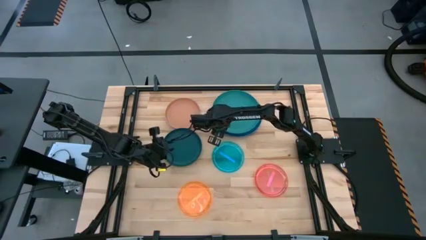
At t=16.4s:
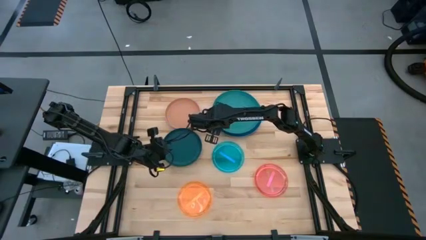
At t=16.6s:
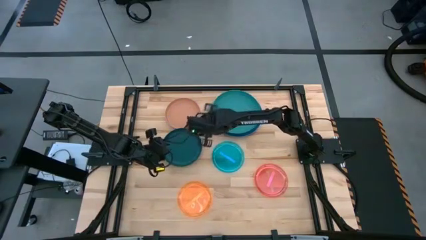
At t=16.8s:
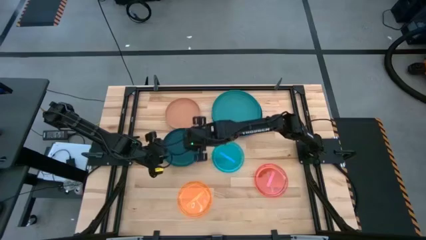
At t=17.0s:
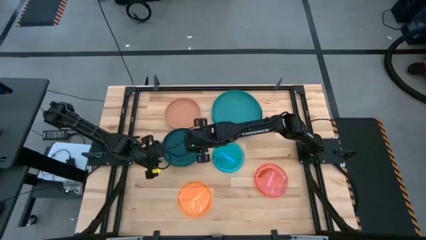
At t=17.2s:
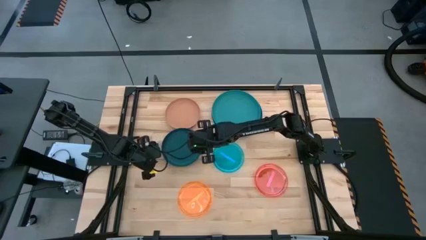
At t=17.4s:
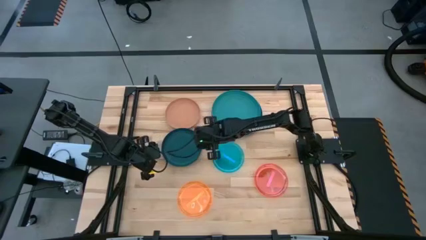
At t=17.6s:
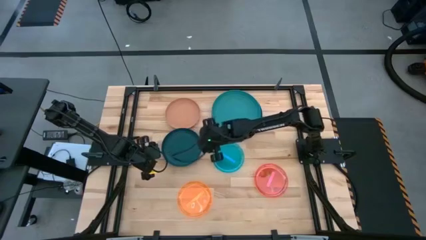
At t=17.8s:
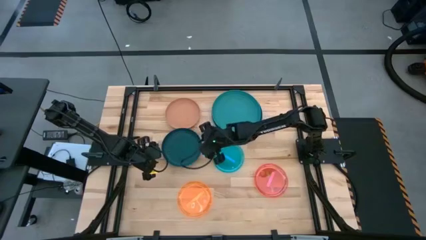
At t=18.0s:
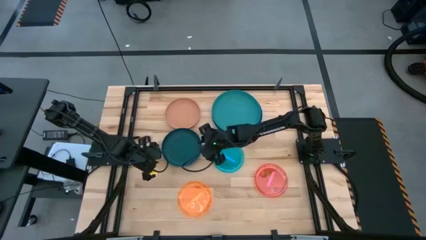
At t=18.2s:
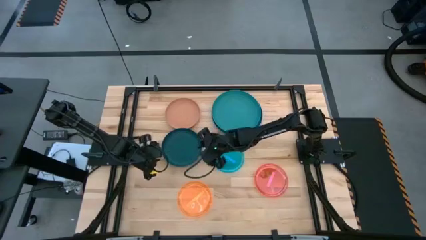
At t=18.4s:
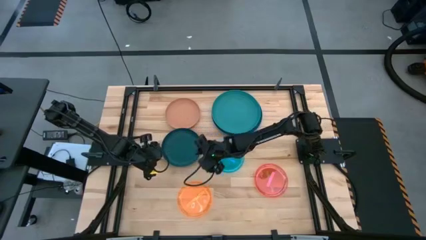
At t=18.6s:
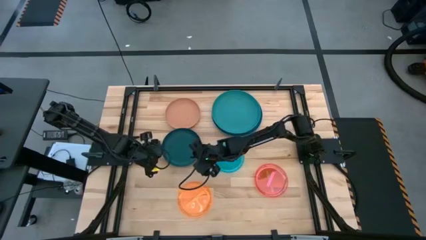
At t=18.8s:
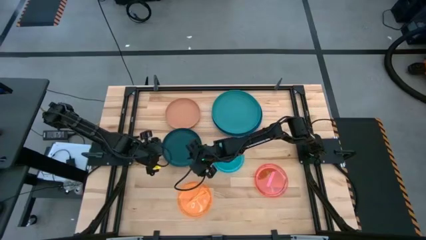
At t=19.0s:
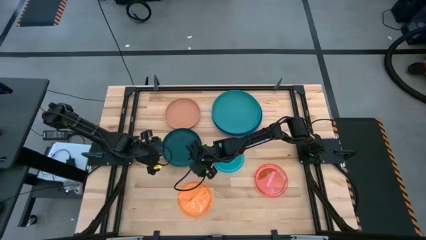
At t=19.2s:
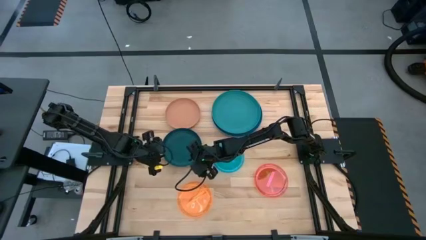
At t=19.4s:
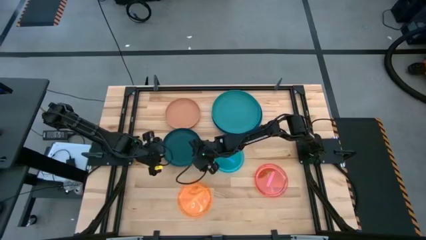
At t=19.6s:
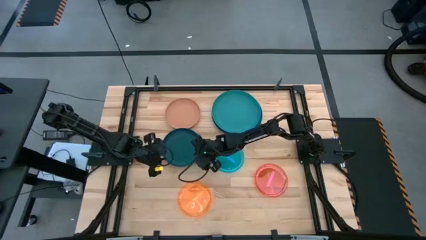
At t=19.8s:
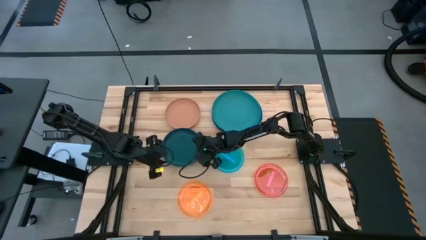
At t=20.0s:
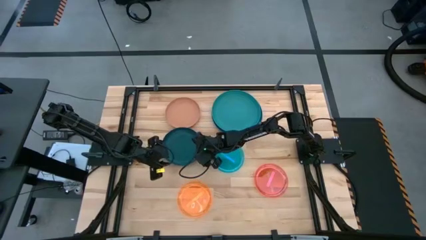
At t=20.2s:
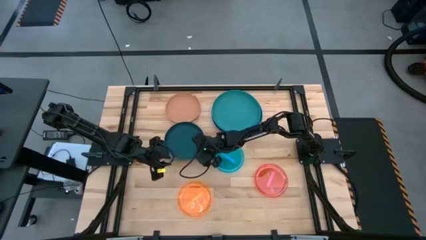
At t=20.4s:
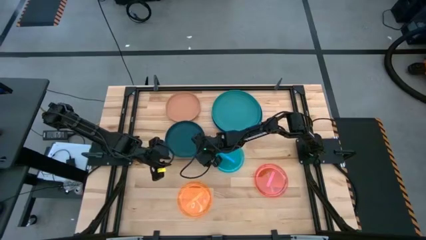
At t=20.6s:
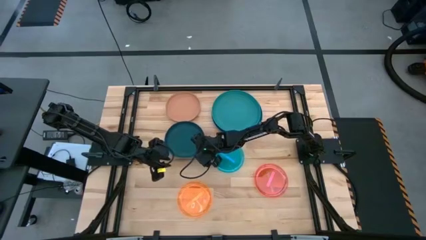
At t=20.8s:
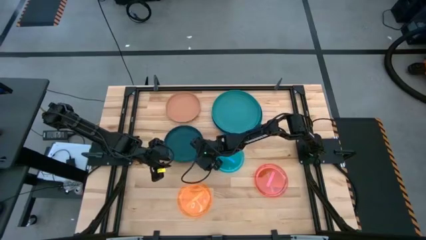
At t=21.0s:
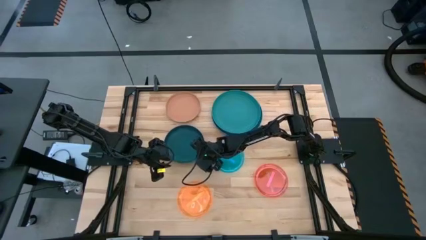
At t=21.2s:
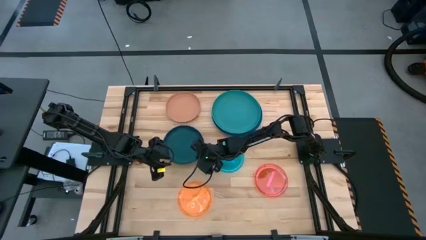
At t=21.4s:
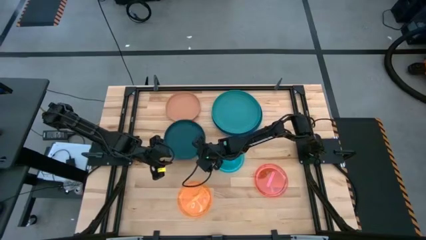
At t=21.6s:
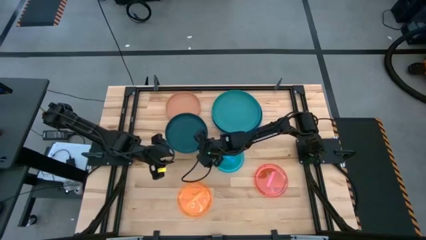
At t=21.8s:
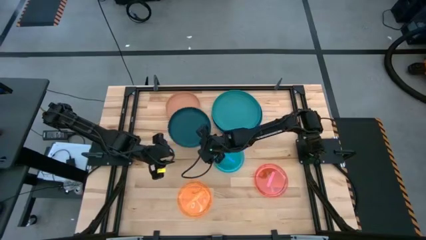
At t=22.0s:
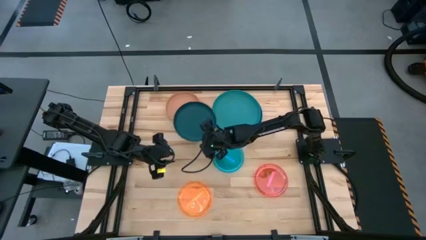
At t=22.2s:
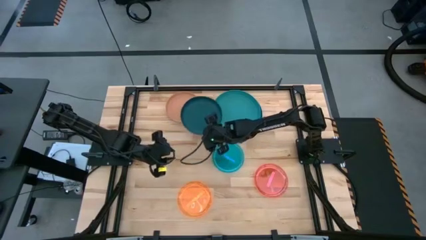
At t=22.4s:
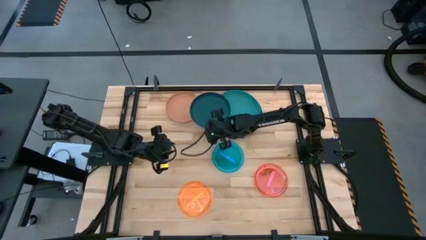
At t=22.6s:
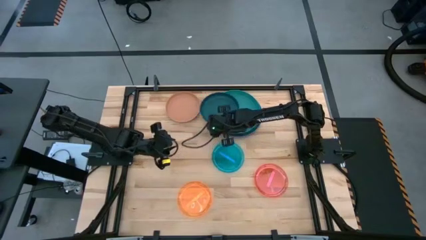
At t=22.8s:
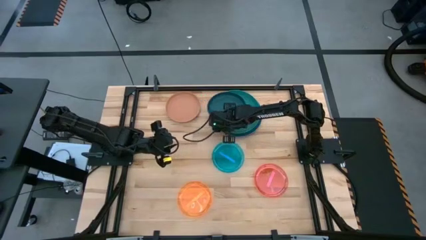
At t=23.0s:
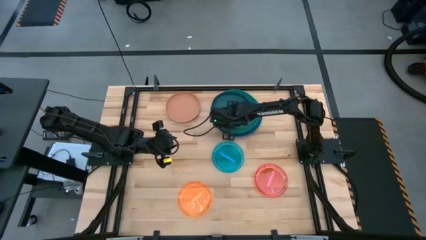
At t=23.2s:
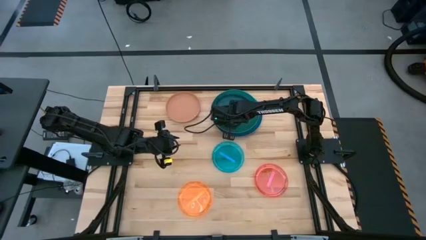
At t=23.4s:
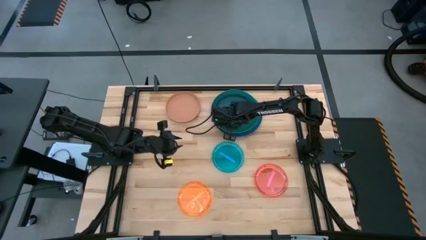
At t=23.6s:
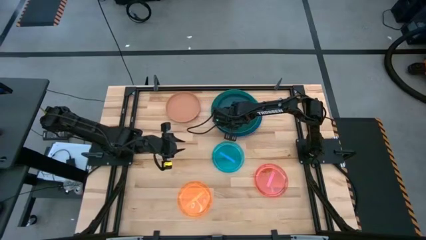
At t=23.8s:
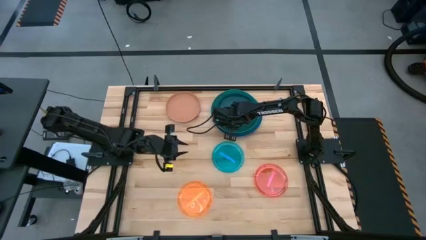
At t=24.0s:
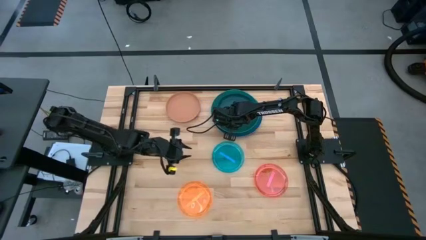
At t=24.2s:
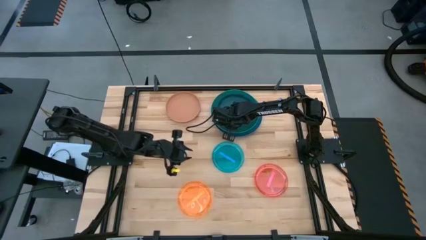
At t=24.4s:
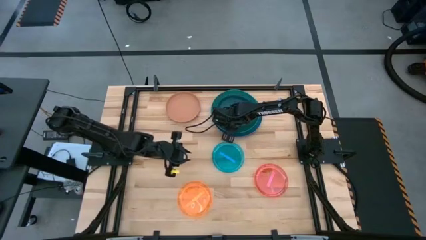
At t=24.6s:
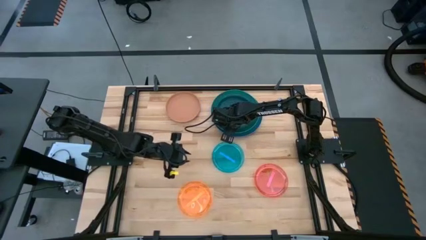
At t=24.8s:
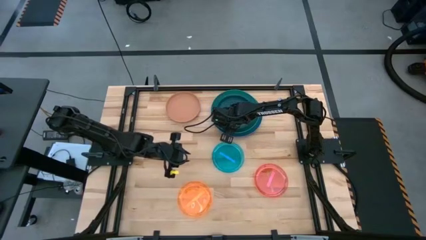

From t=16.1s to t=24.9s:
Task: Stack plastic plates
Stack the dark green plate on top of the green plate

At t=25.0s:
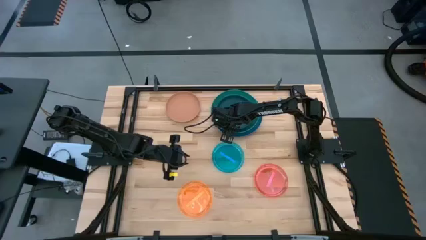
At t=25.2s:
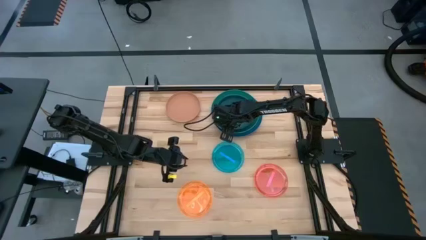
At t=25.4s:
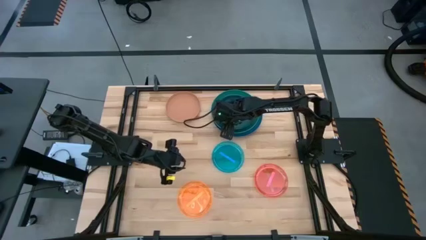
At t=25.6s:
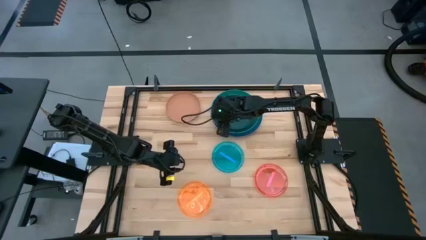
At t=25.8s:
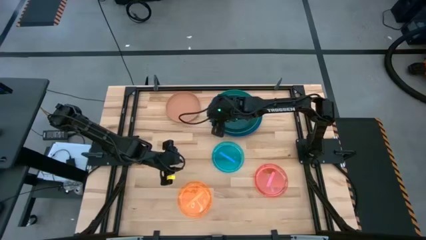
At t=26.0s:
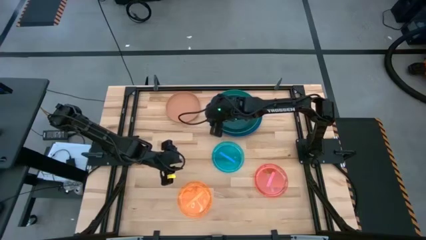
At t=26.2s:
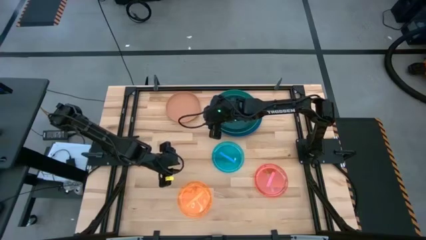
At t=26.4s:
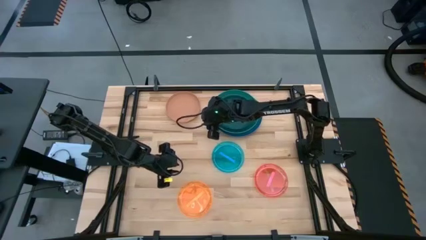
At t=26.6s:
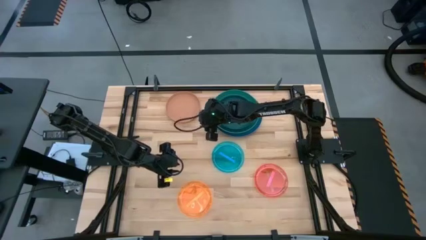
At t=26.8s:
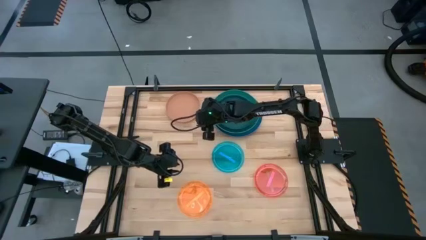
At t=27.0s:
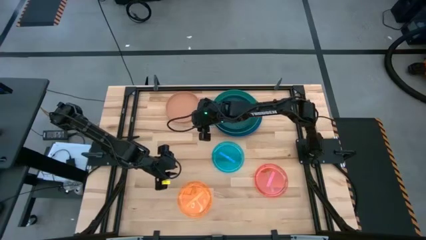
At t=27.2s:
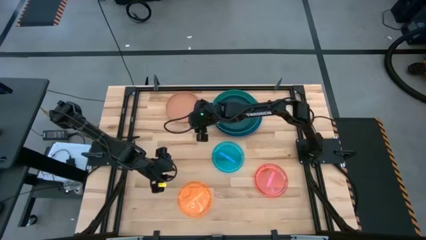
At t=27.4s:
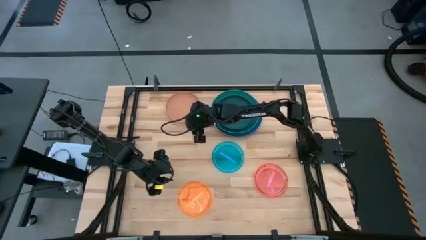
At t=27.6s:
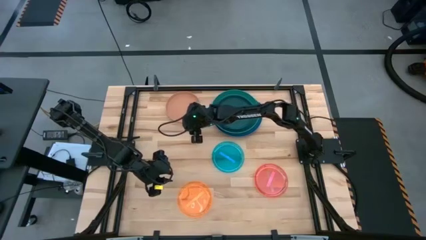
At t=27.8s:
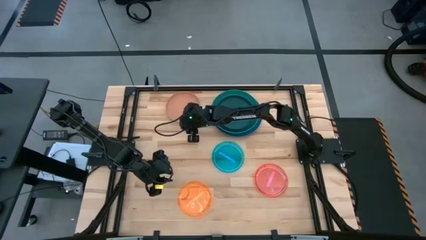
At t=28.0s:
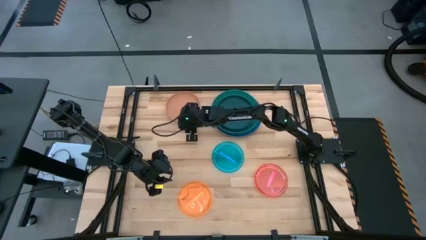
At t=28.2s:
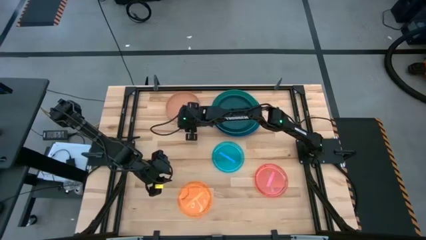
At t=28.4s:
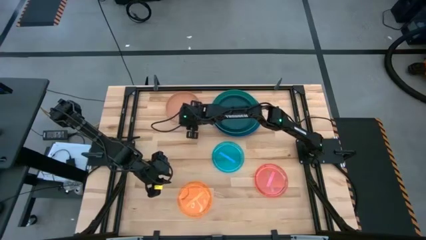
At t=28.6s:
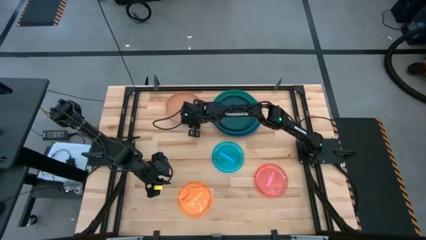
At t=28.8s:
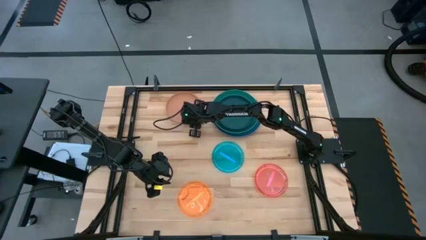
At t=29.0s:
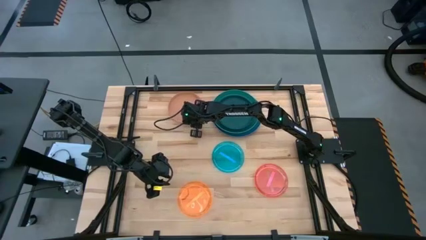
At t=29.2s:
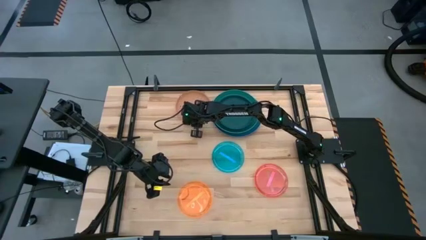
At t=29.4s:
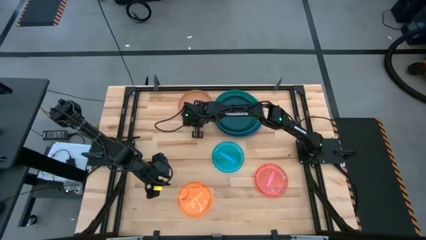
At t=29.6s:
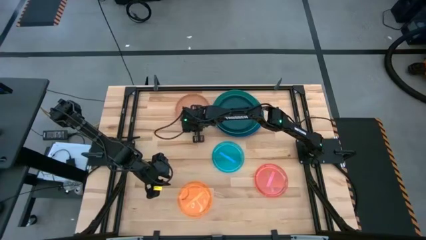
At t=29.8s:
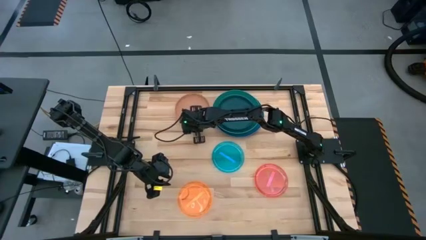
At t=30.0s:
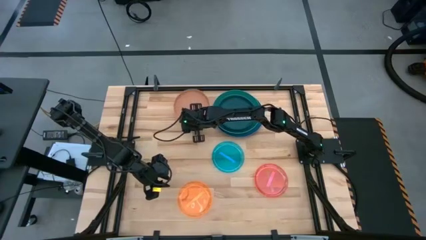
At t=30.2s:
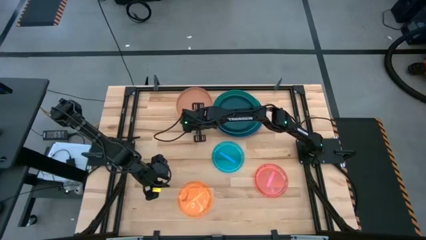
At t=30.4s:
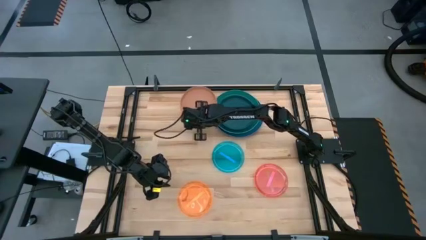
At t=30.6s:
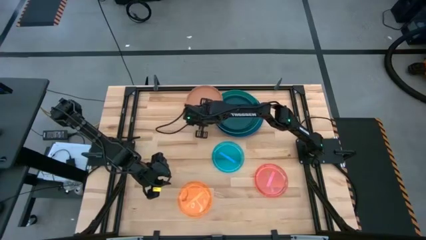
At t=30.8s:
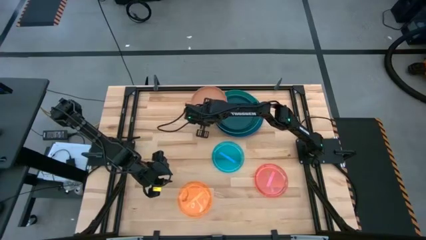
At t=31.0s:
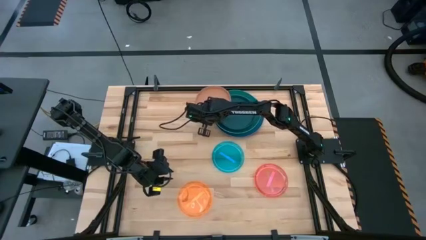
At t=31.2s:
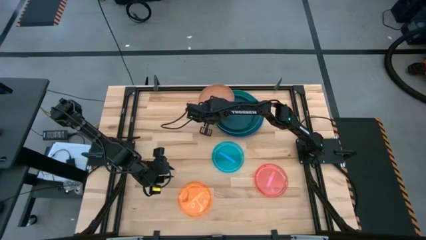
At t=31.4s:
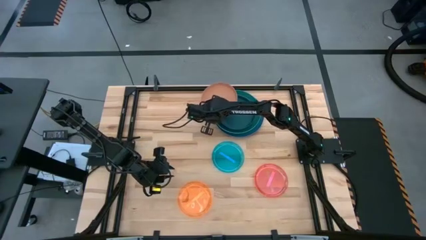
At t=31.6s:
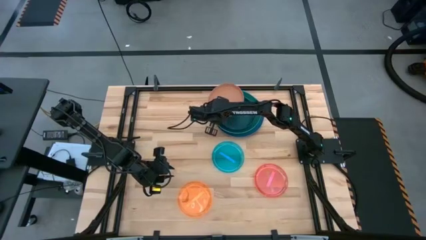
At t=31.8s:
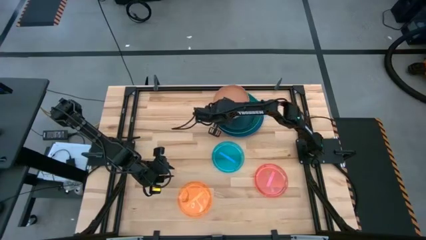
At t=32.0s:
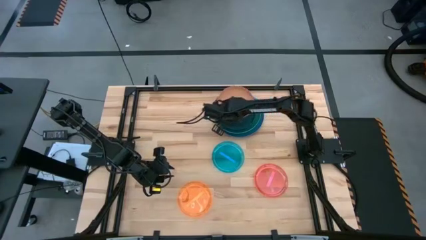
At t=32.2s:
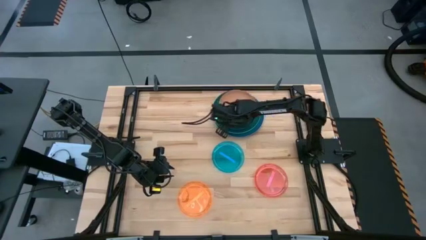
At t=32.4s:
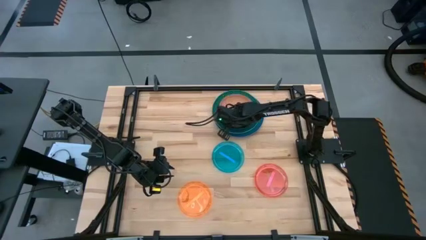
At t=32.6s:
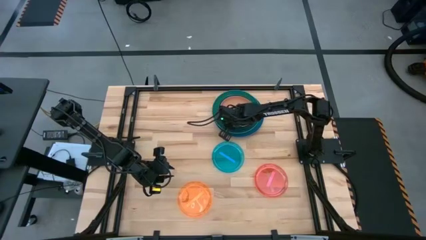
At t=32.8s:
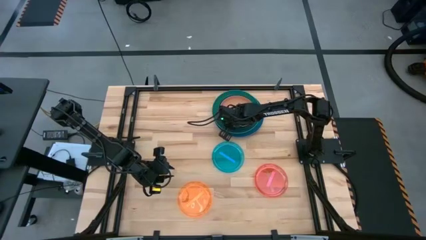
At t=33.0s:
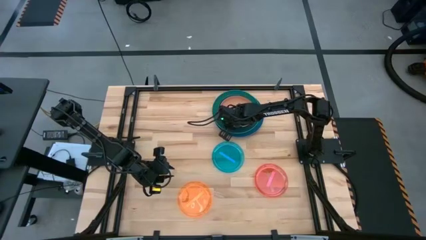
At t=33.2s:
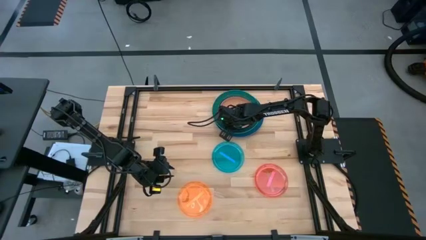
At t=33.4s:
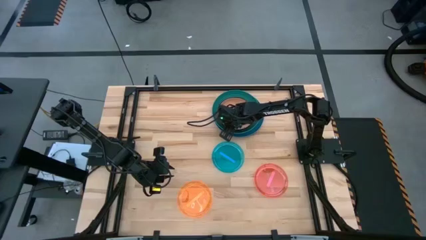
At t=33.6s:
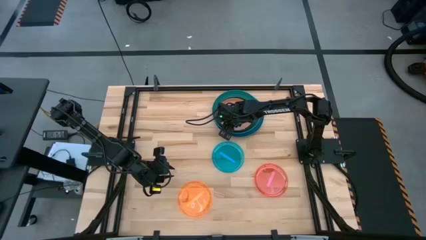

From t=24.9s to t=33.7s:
Stack the brown plate on top of the dark green plate
